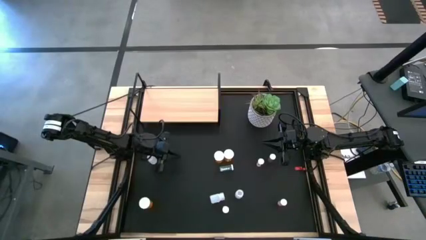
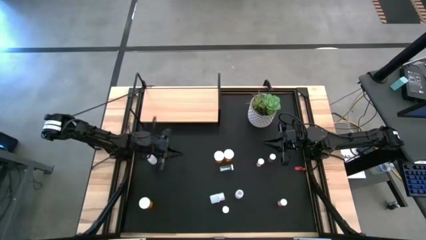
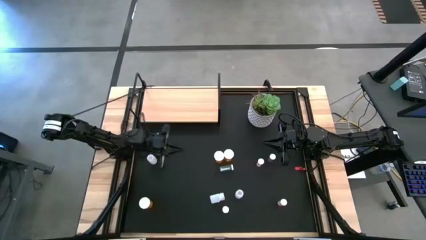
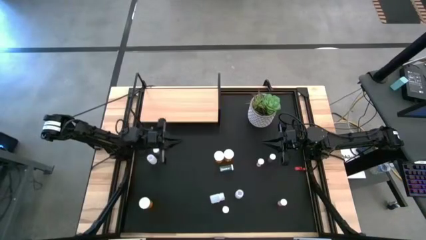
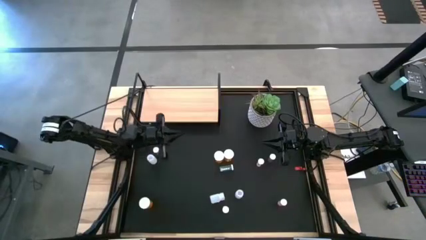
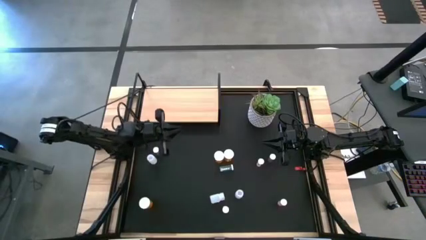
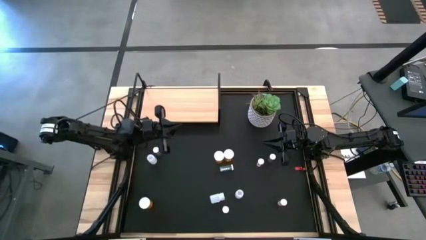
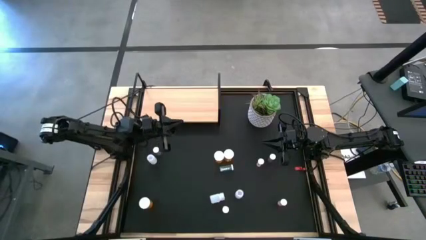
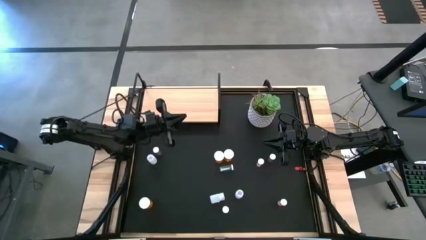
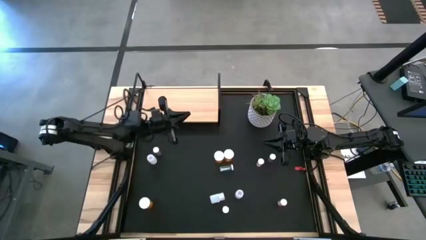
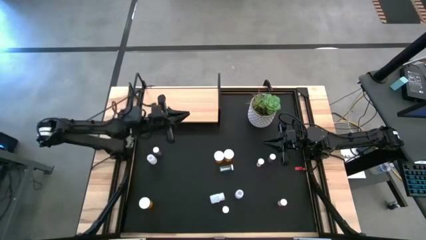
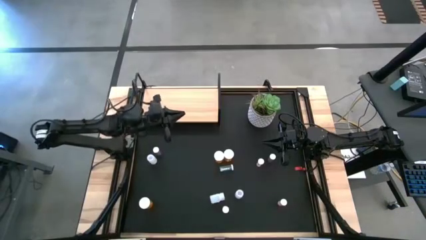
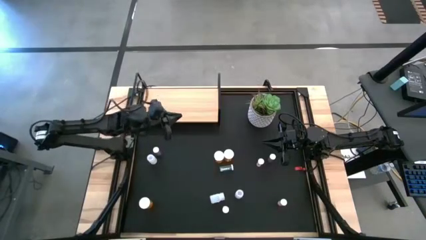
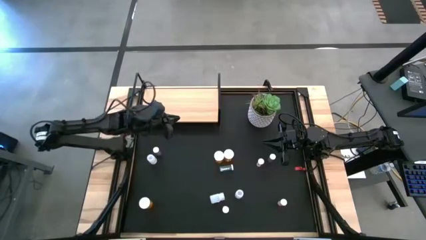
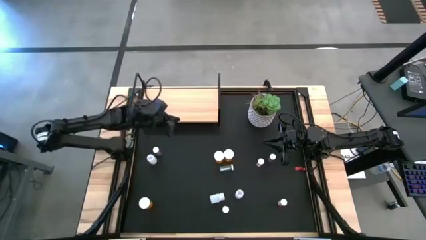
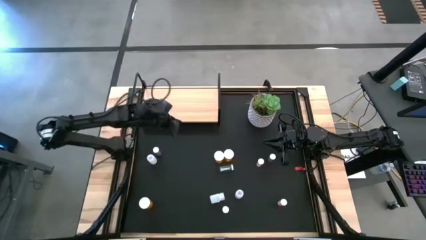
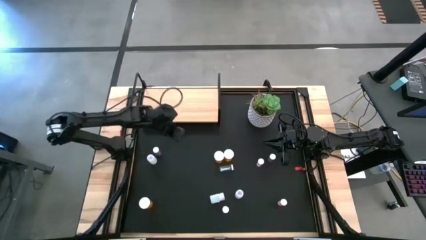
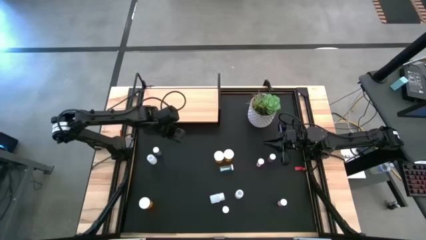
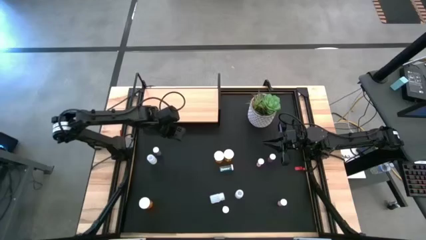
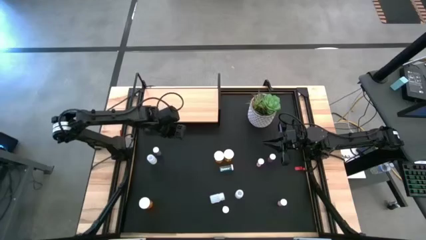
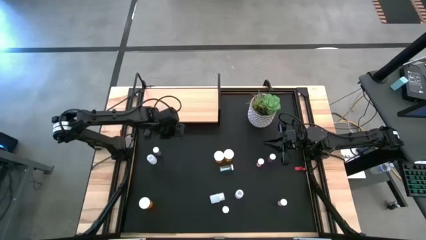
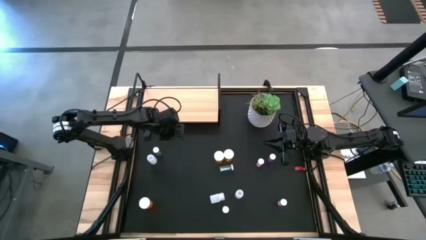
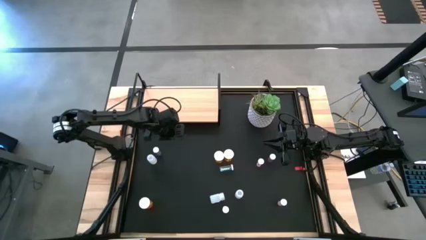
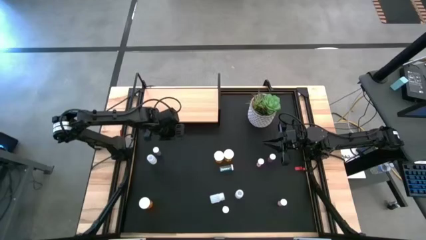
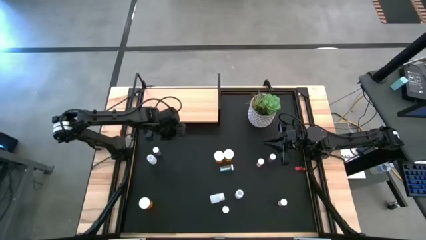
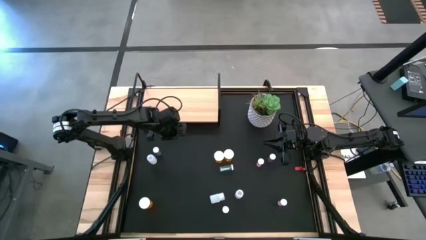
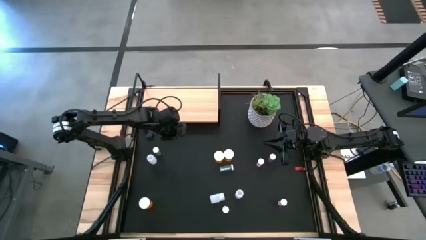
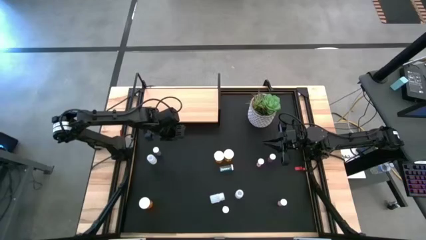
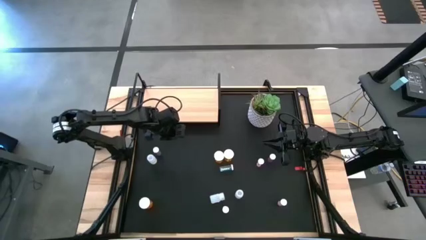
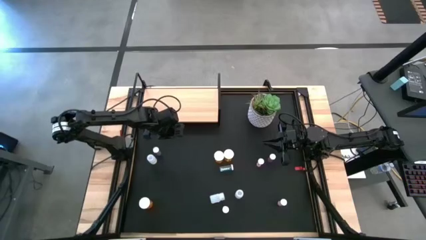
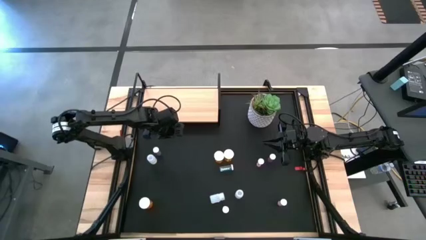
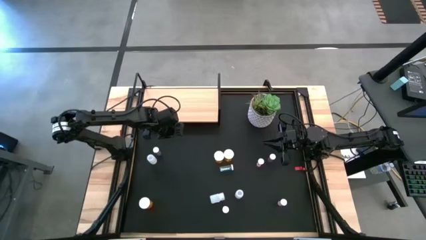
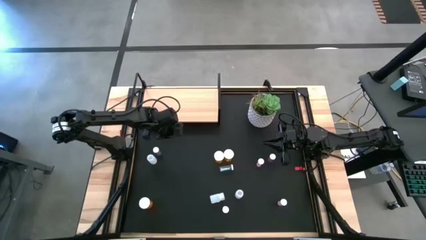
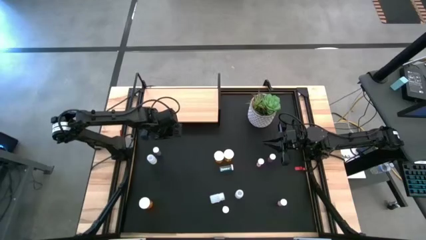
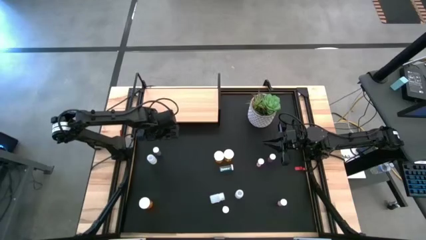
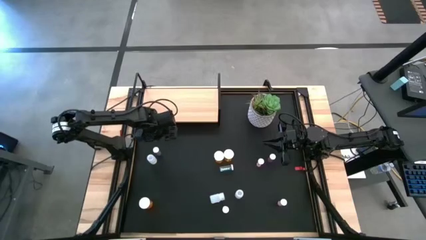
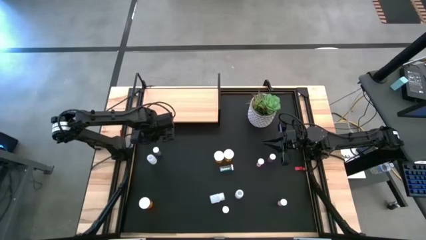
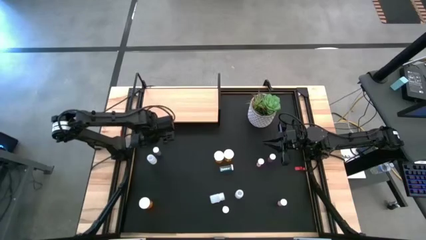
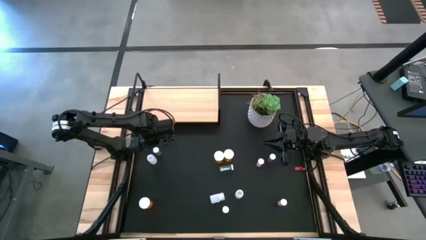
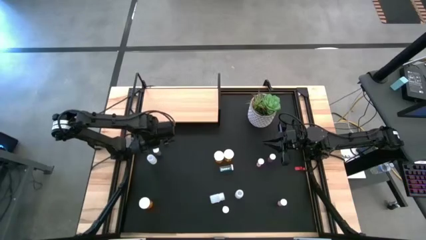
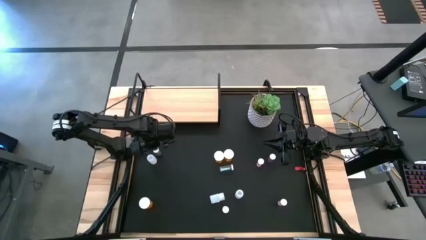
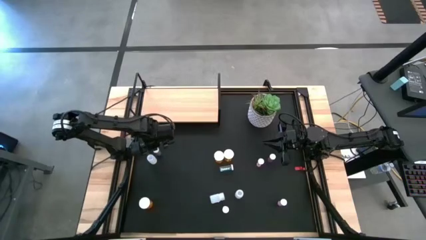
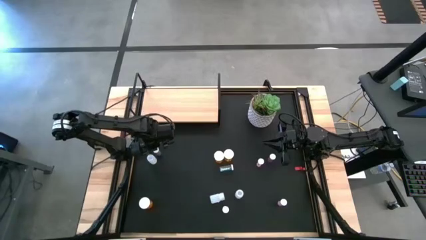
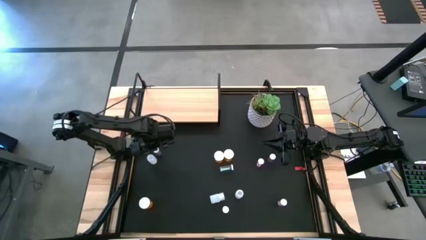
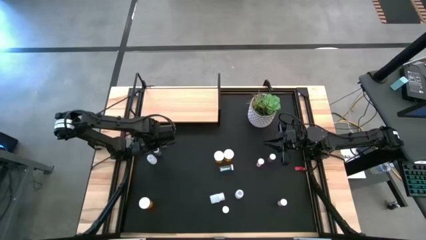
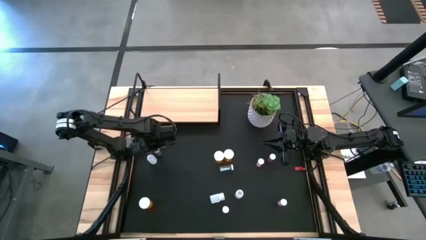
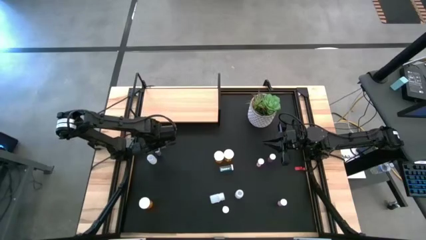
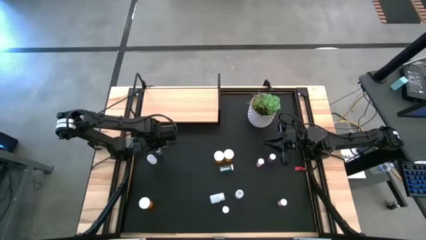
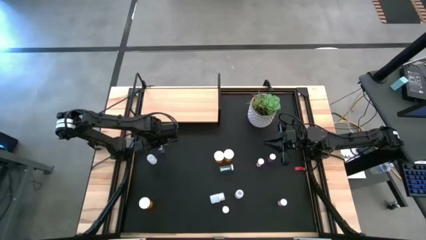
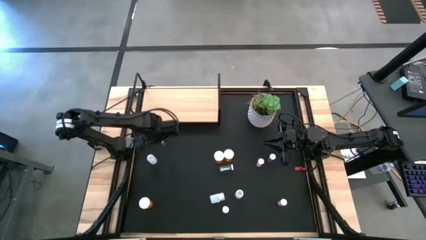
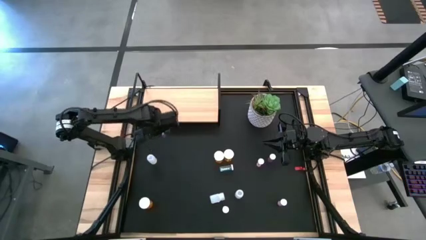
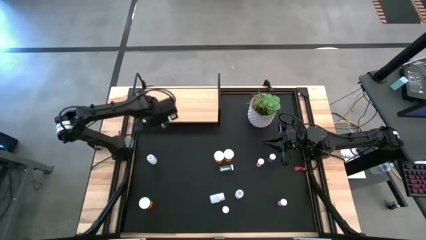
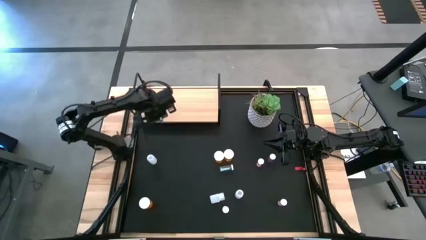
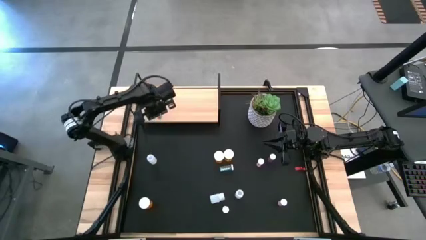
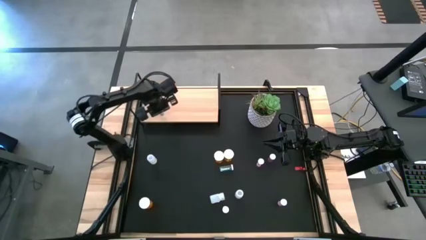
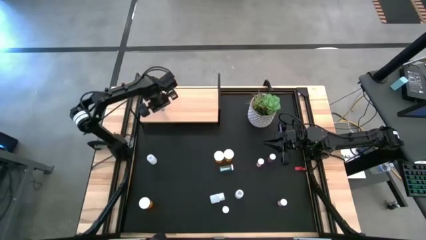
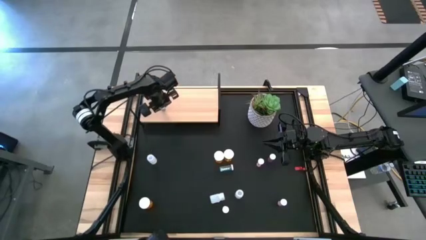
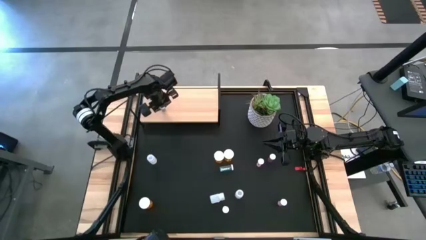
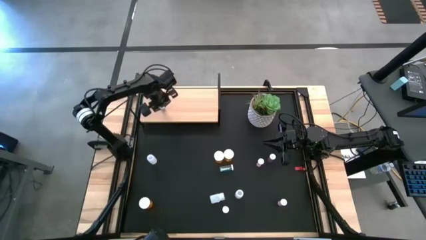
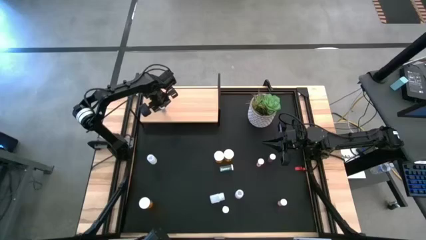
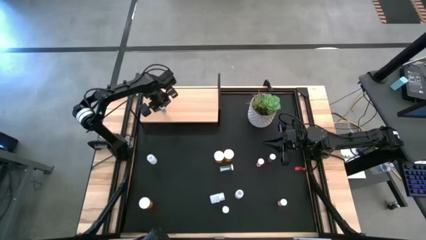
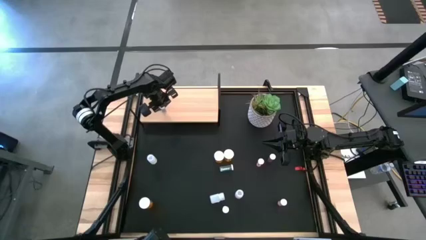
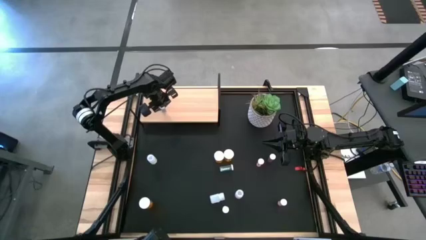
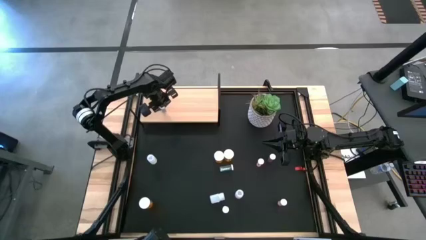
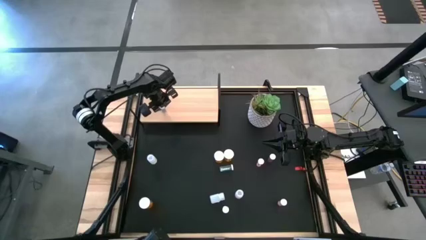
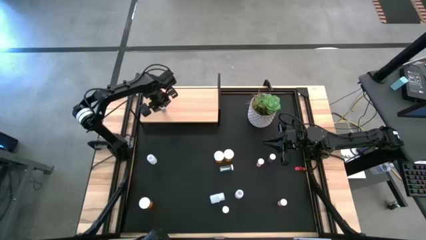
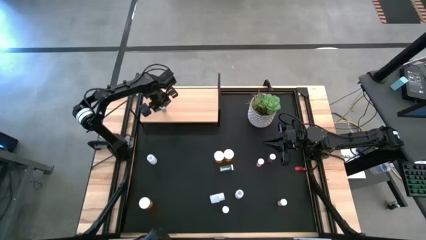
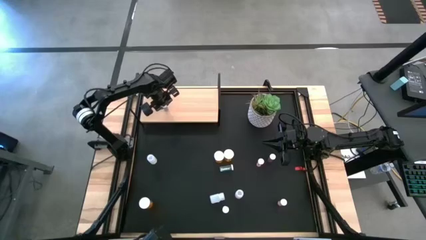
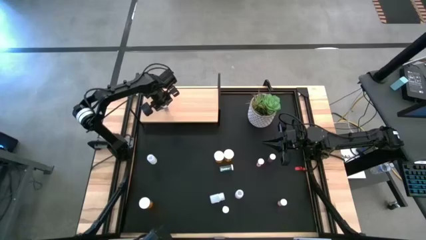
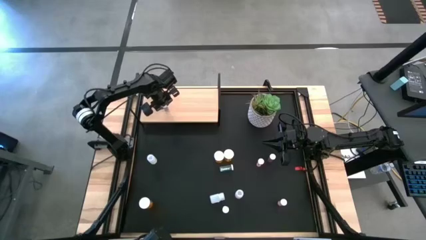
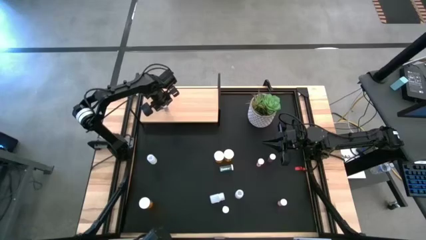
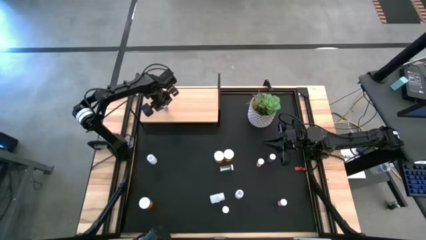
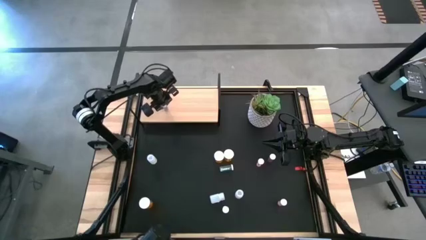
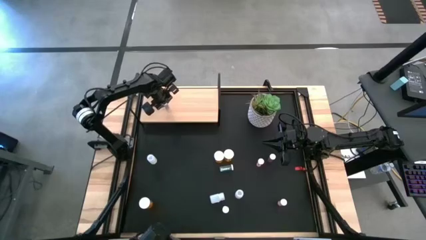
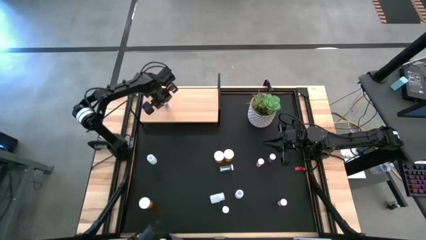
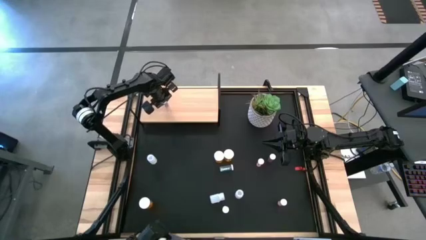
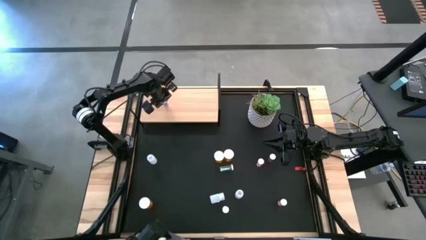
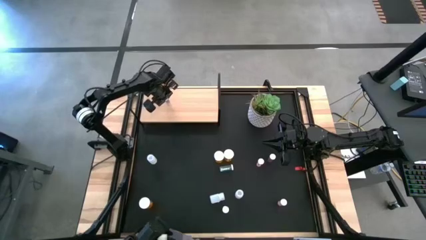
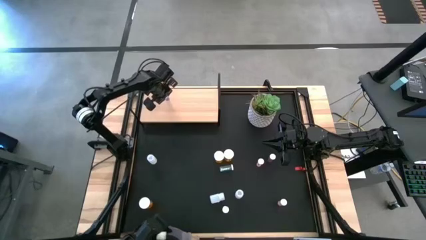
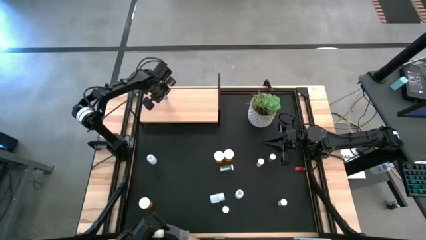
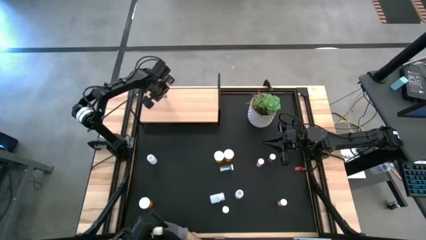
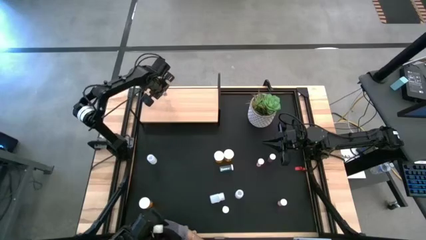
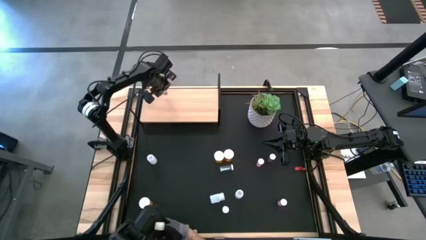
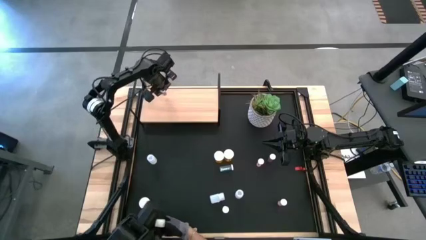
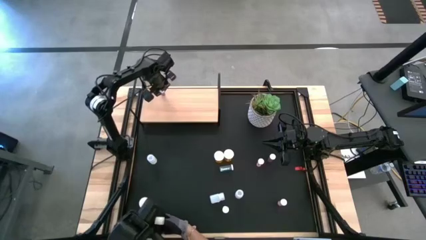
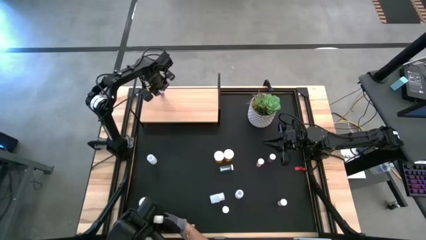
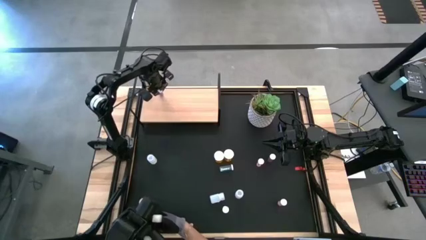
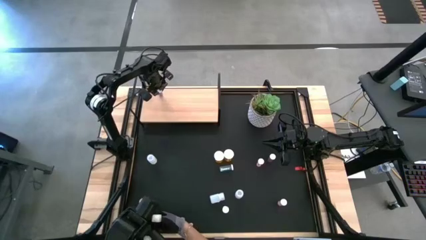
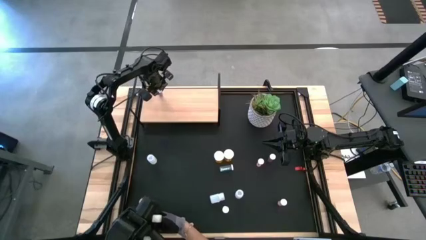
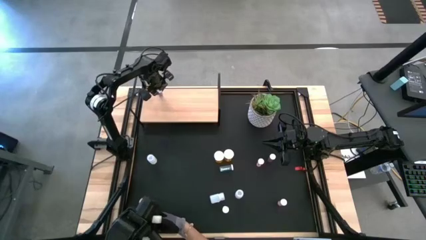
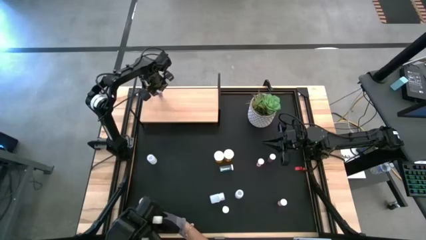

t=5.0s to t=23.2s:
Task: Pick and place medicine bottles onto shelf by color
Put the top left blue pill bottle on the shelf
